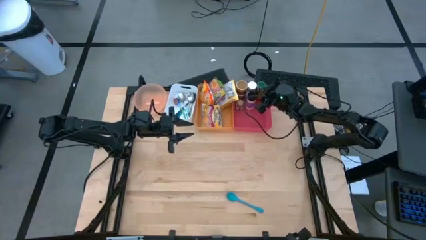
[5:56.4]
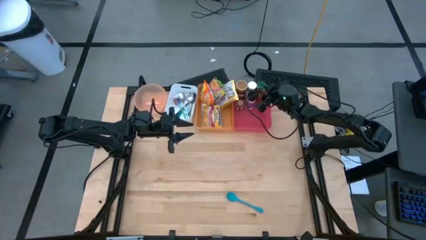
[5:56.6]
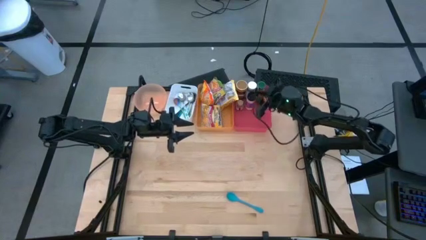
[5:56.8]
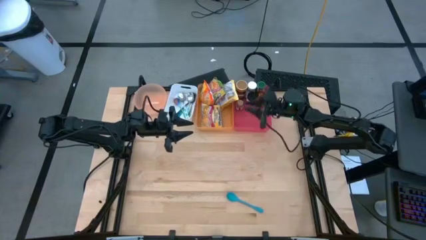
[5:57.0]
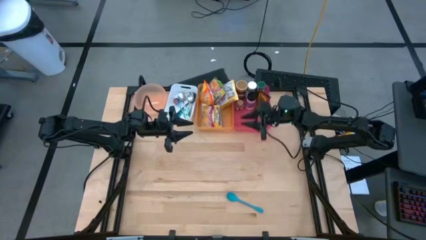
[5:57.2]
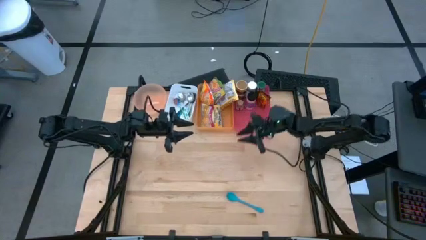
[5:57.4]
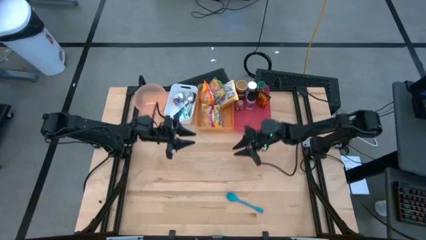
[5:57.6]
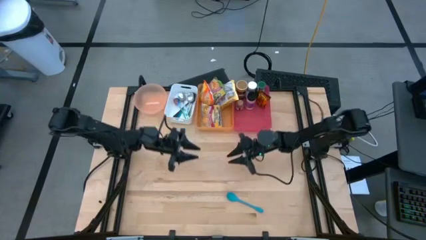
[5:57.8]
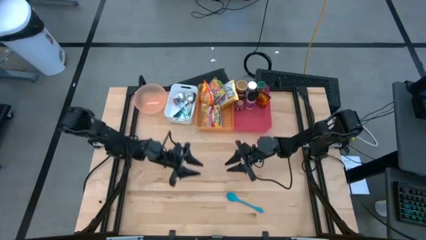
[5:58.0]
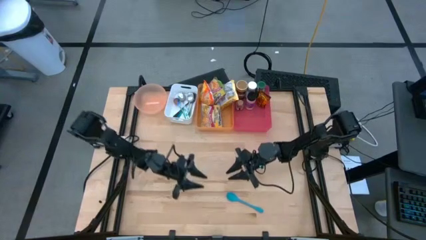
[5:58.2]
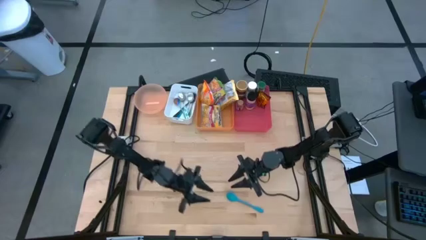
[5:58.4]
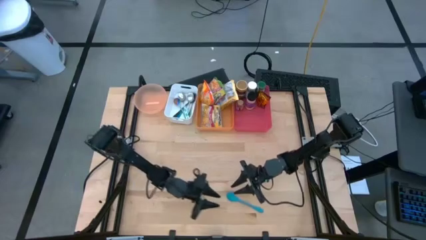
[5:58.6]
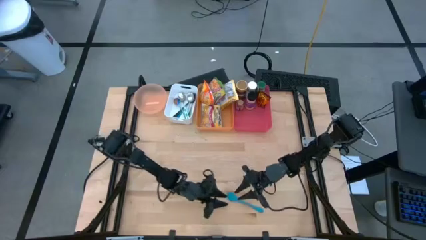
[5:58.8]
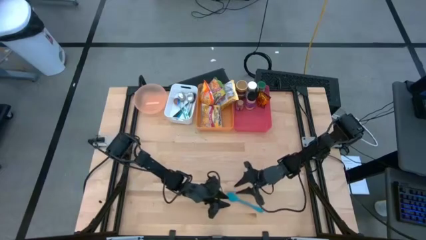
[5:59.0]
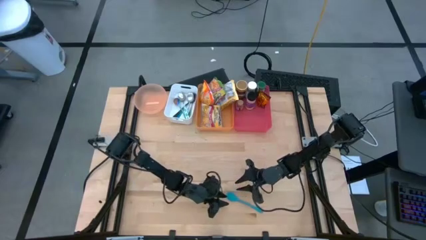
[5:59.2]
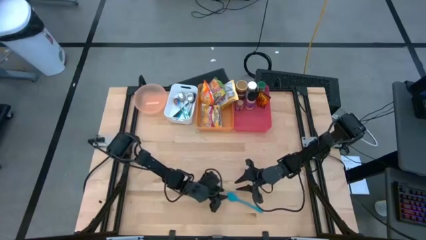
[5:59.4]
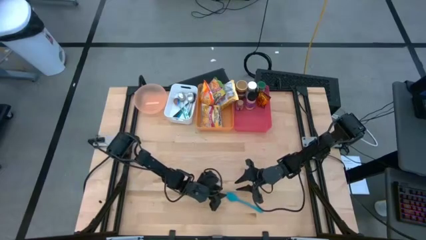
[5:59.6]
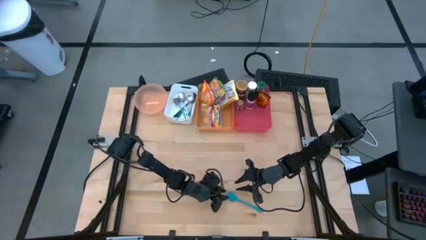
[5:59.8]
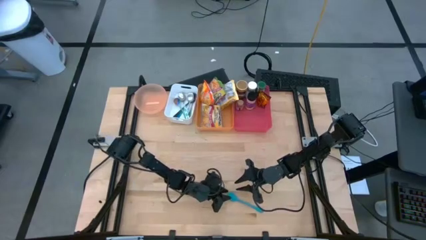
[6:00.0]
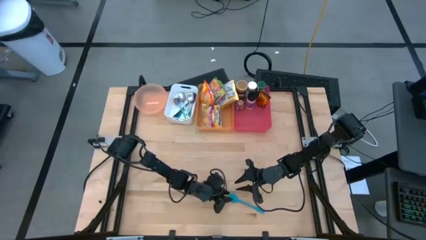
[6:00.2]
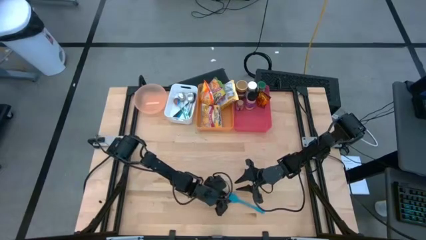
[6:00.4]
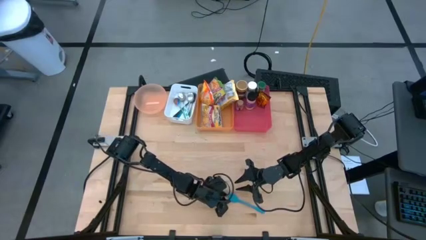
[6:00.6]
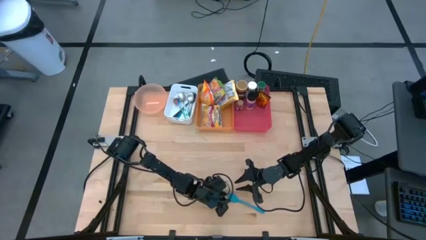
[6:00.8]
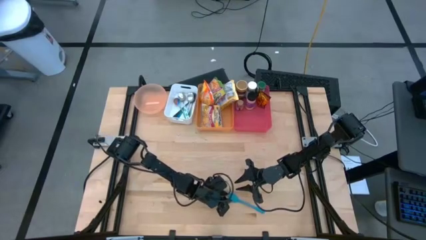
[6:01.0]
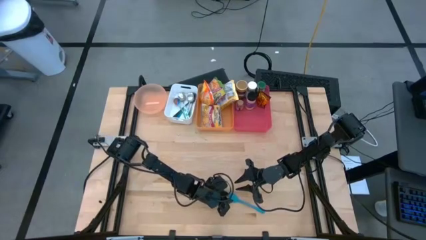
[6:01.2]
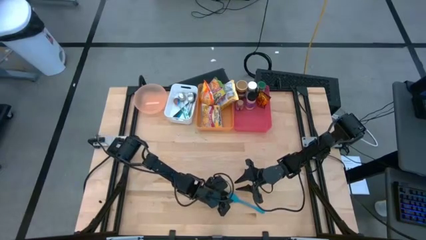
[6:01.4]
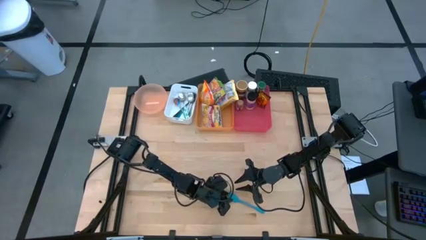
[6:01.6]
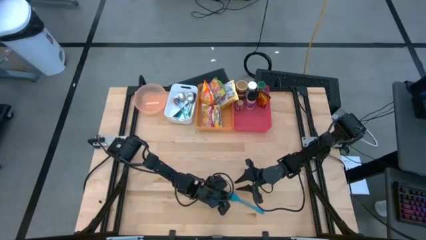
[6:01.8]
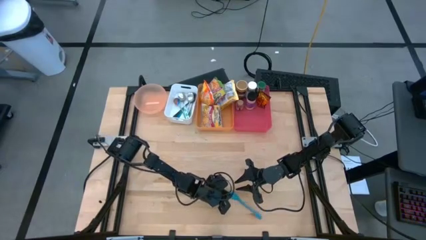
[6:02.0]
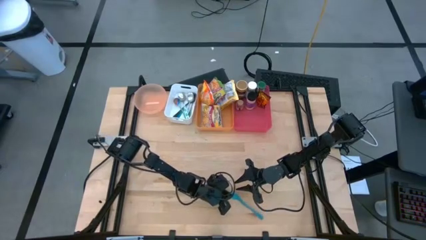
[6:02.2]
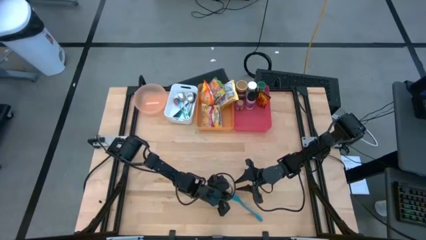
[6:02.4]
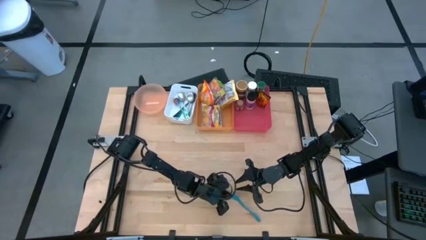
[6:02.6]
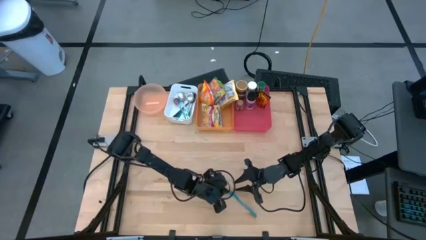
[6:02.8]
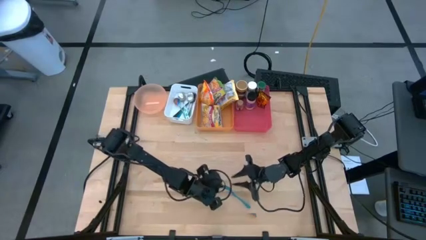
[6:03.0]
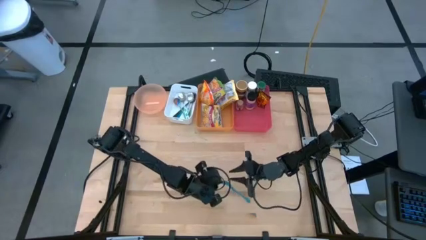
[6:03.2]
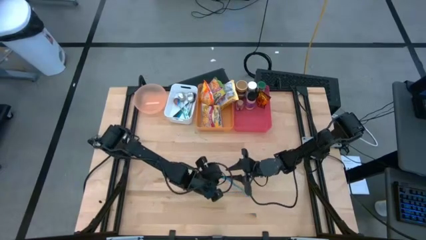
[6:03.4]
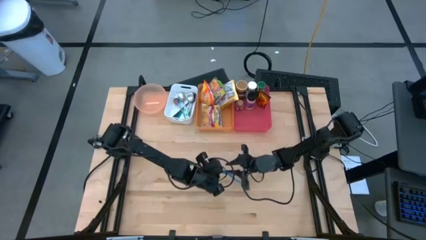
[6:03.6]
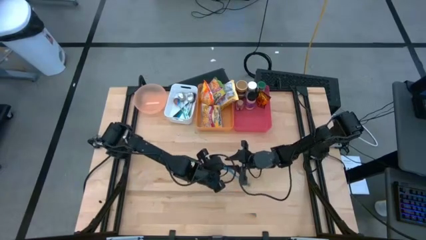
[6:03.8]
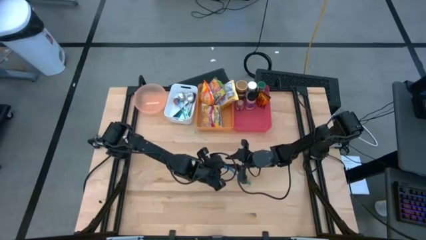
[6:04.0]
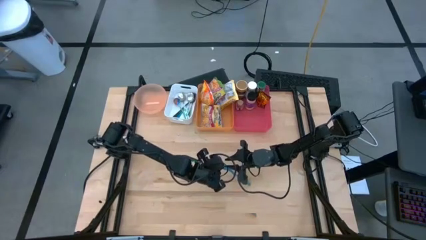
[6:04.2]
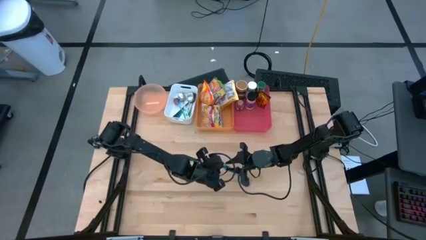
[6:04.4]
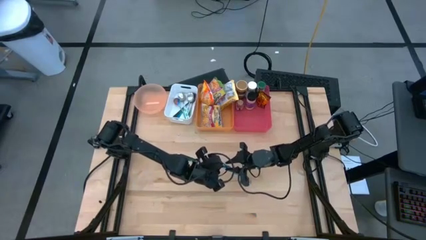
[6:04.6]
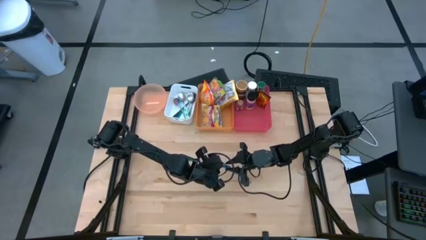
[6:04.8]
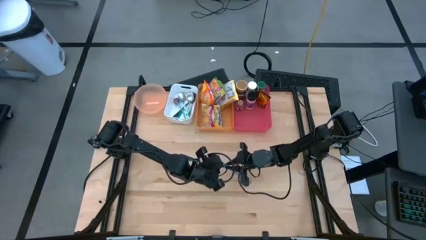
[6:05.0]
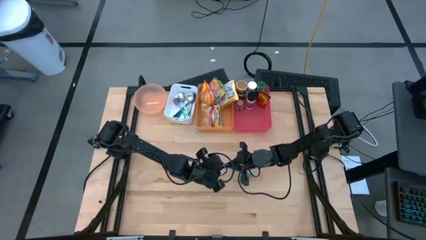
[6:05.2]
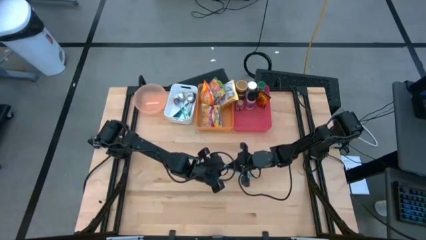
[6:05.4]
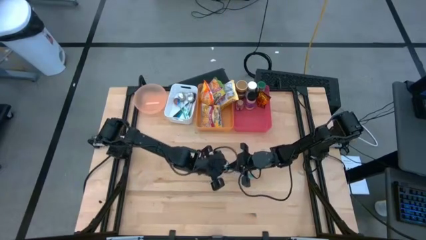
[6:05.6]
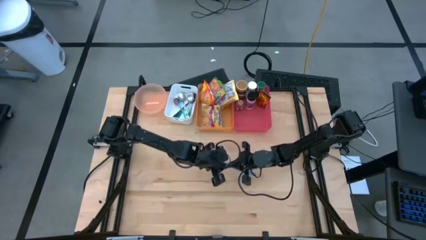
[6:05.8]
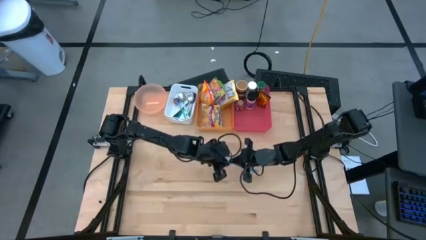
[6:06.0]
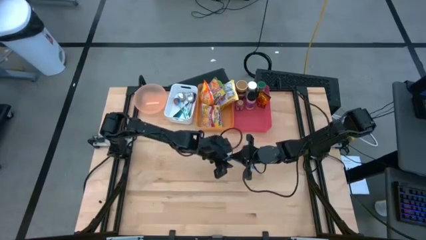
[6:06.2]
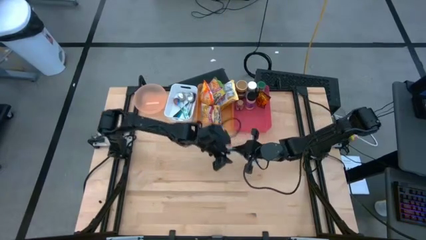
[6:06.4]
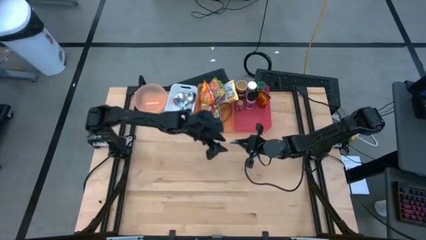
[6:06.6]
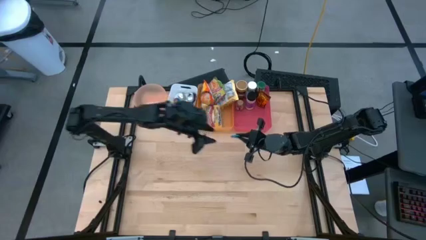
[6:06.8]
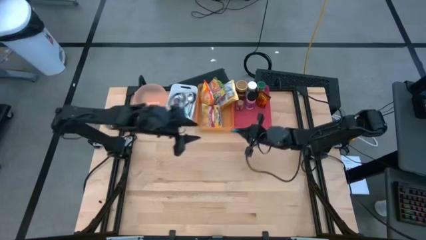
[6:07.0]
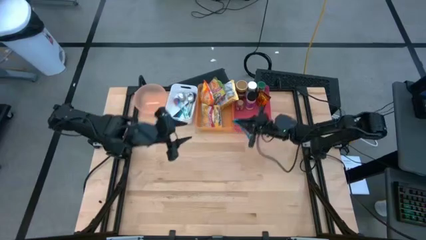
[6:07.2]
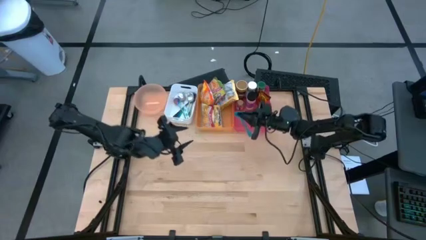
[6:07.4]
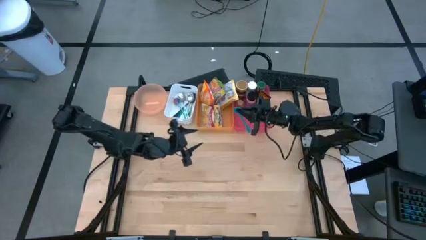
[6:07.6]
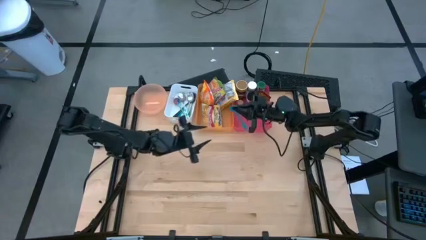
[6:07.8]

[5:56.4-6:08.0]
Task: Pick & Place Food Item
Put the blue baby spoon into the white bin

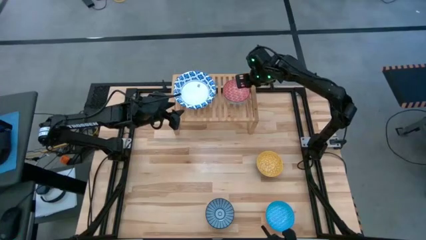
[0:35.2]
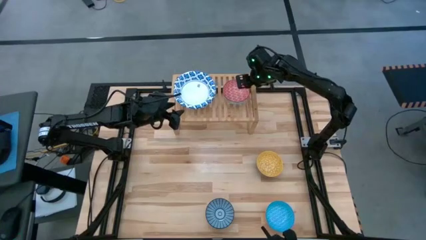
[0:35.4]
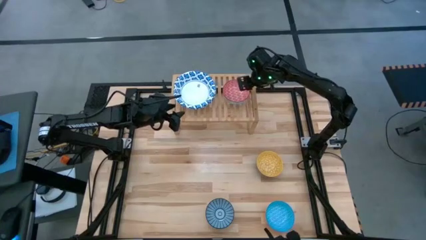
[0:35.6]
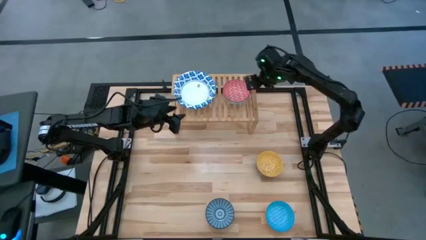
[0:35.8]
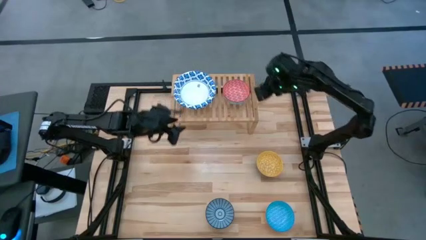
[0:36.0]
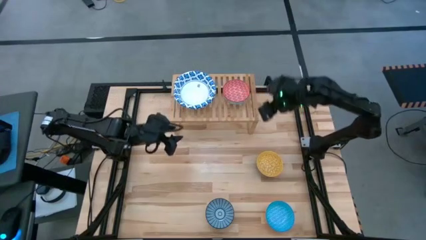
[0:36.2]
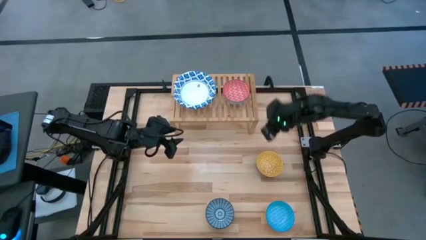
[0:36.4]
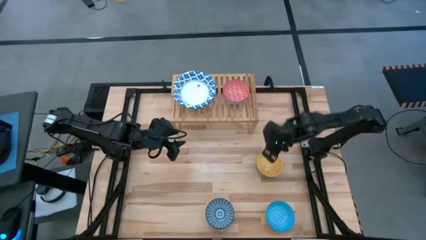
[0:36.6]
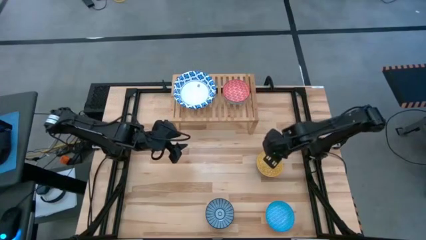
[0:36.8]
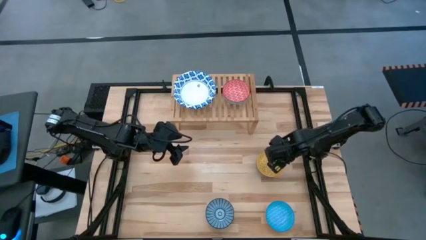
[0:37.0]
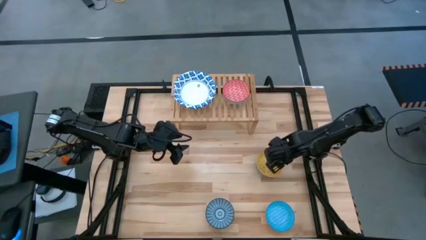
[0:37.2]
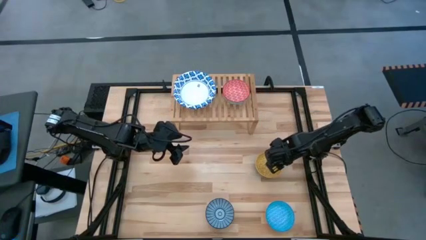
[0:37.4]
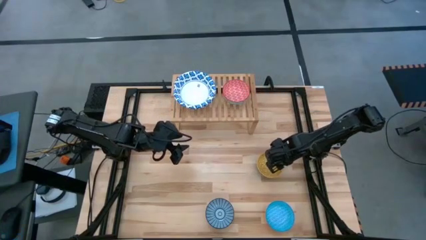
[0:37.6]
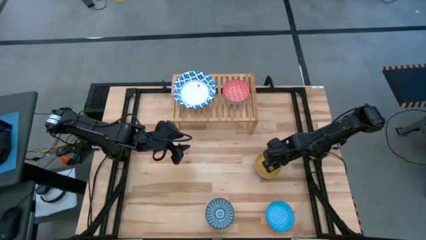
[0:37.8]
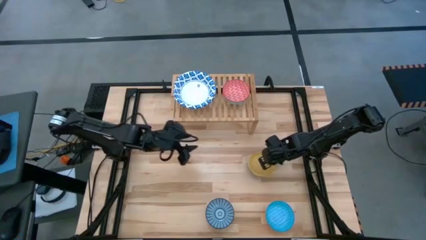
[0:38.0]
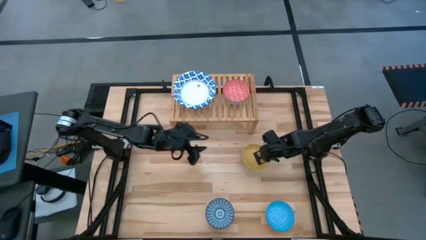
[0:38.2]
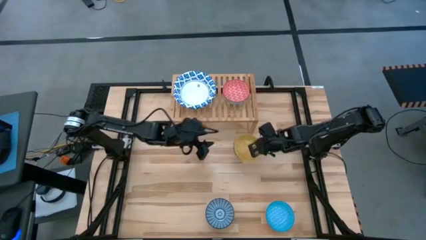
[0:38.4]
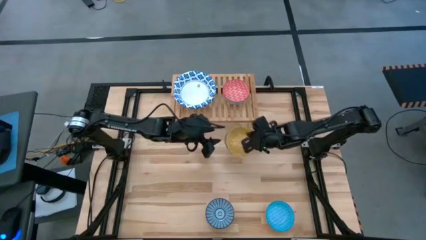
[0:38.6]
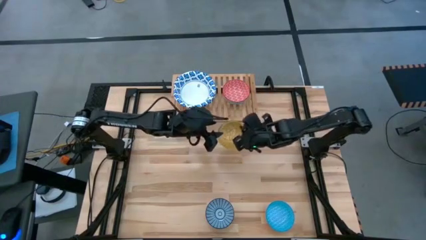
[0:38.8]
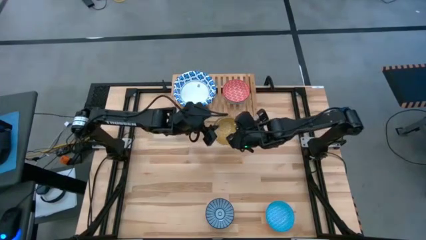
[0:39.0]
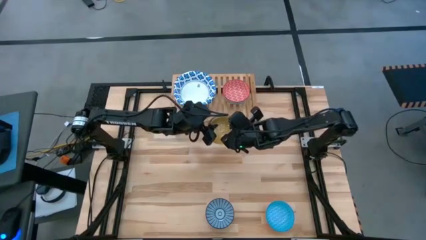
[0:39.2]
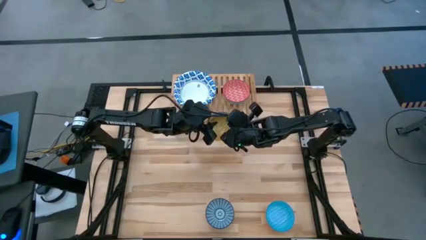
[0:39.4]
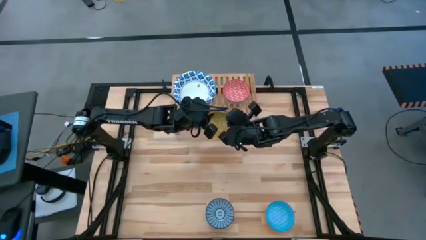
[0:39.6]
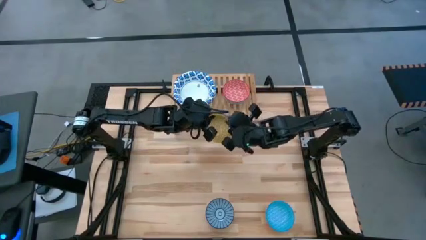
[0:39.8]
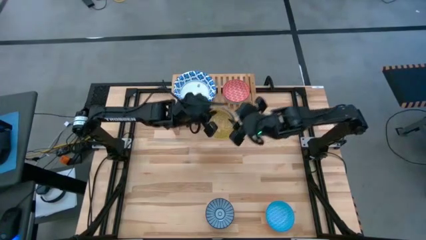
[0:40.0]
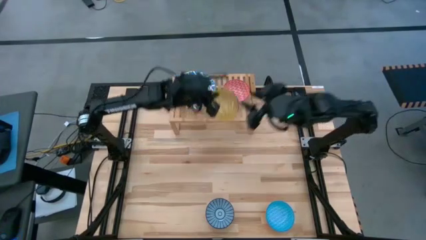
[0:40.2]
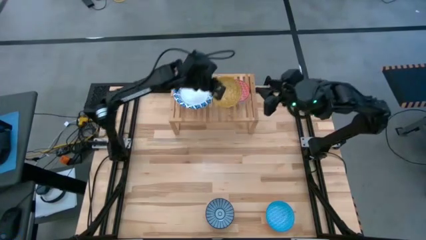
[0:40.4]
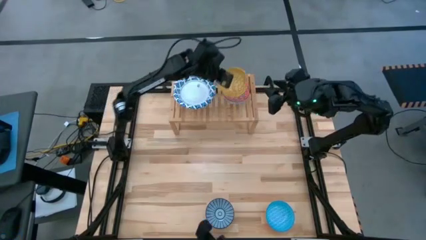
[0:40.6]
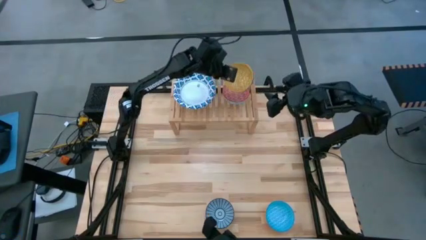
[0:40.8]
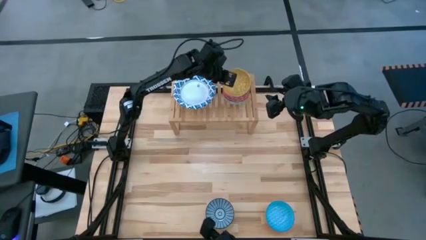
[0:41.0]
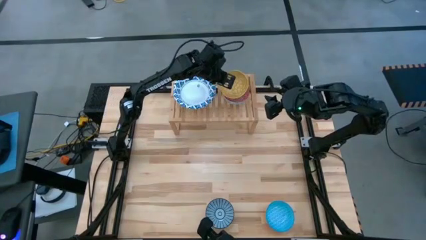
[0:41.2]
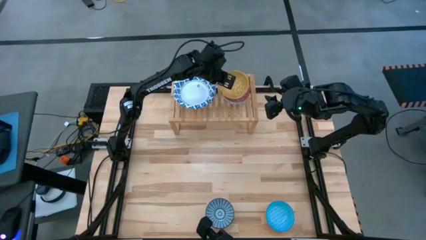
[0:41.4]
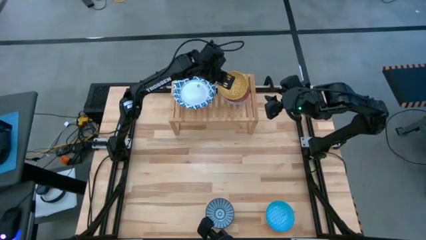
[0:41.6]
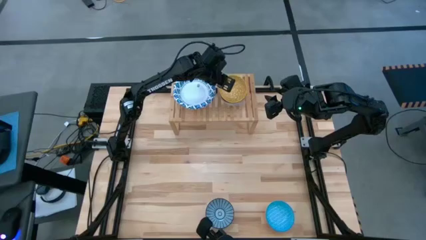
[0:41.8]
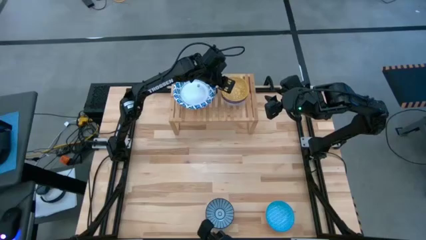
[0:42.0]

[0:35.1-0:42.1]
Task: Place and stack bowls onto a shelf
Stack the small yellow bowl on top of the small red bowl
